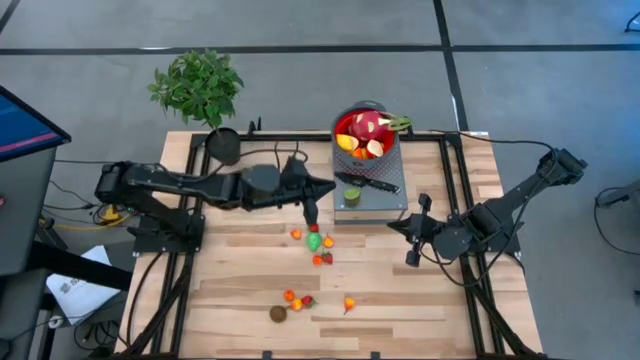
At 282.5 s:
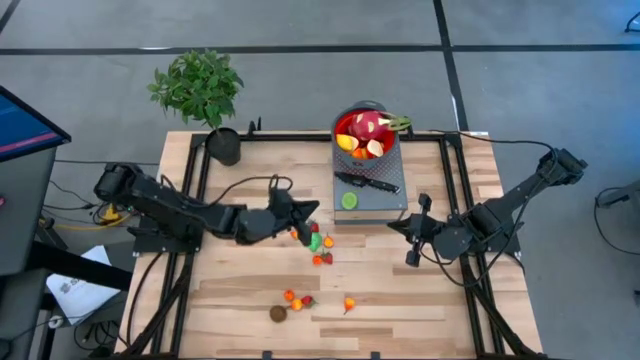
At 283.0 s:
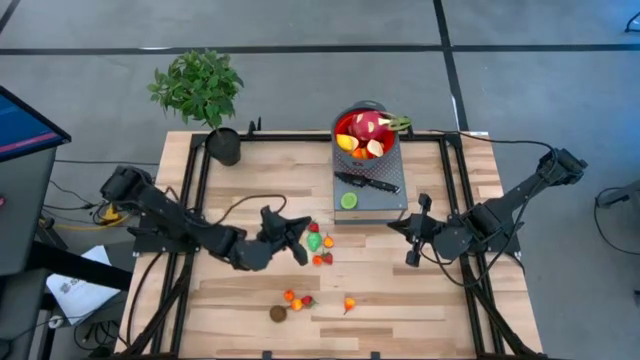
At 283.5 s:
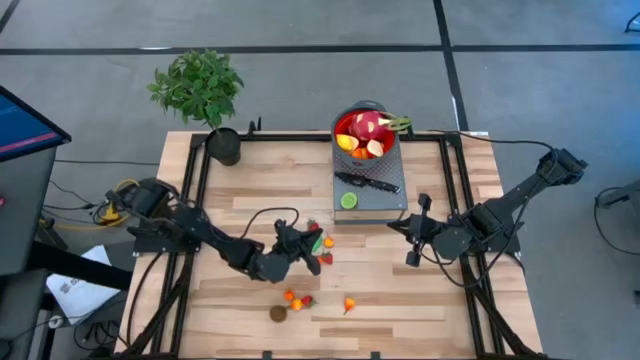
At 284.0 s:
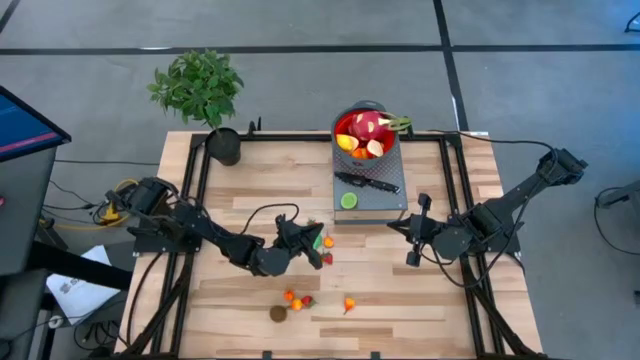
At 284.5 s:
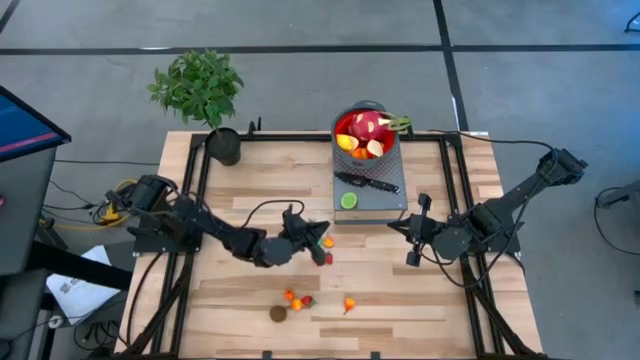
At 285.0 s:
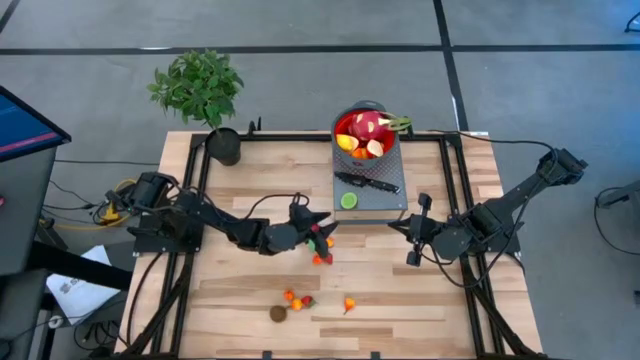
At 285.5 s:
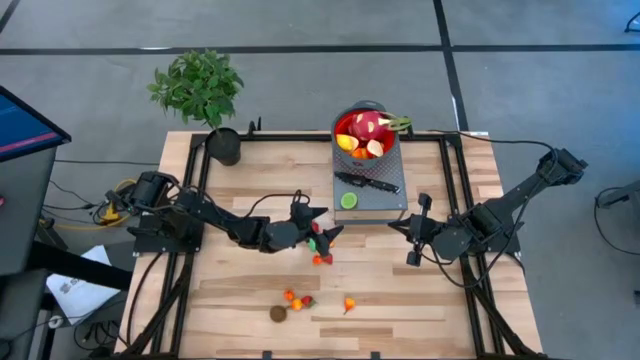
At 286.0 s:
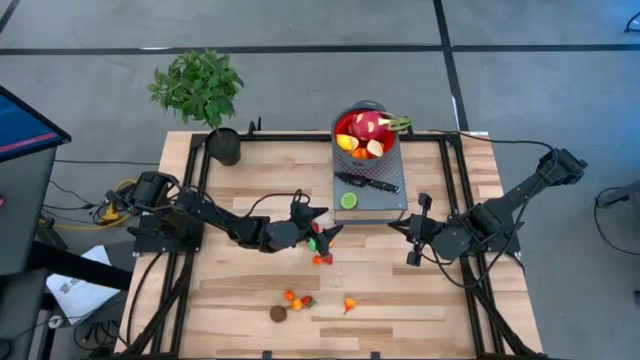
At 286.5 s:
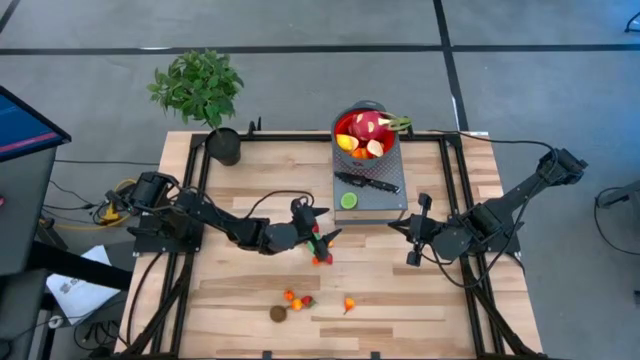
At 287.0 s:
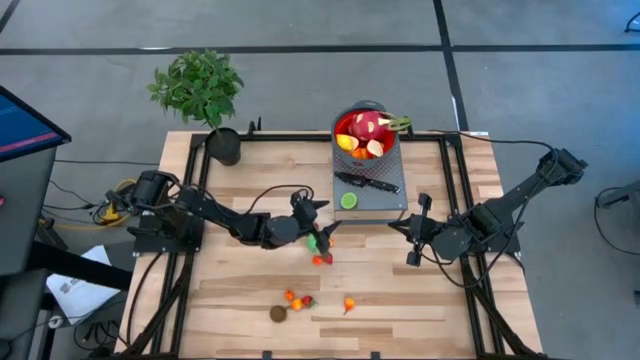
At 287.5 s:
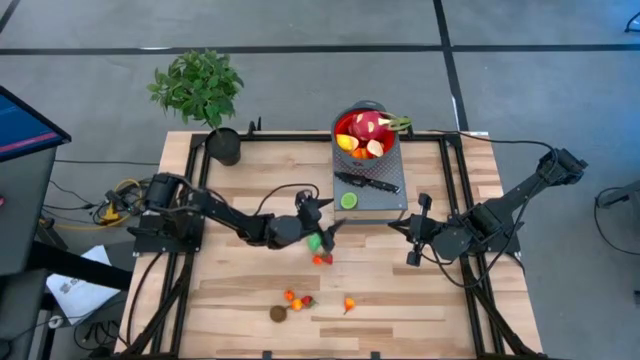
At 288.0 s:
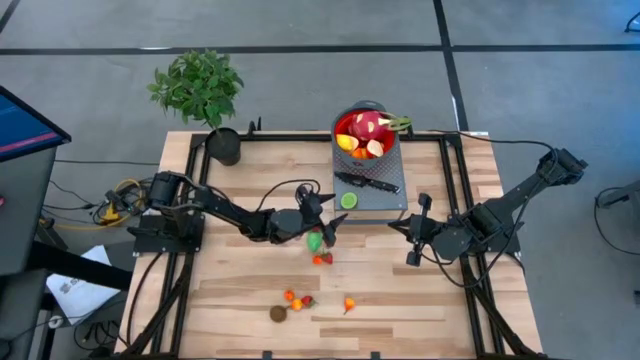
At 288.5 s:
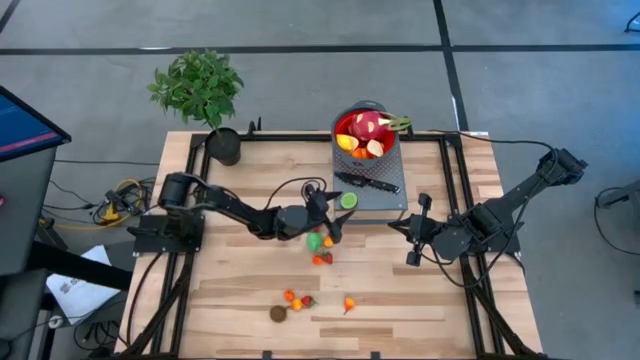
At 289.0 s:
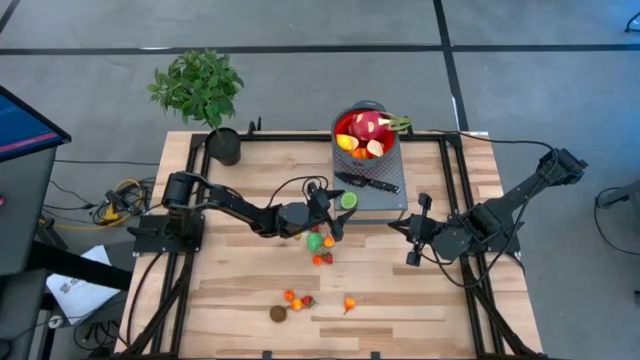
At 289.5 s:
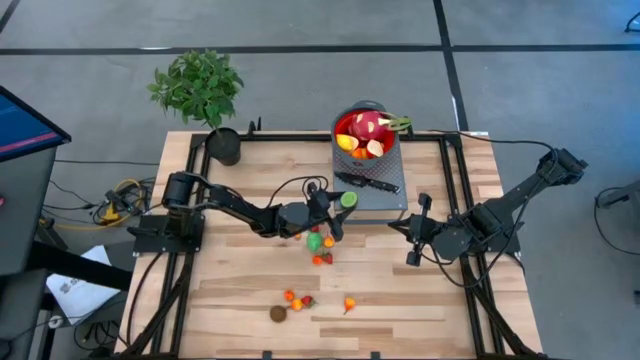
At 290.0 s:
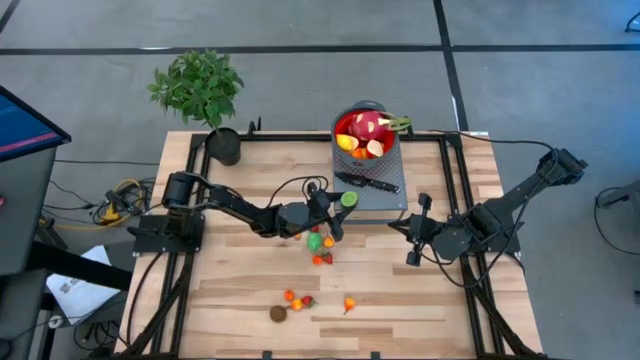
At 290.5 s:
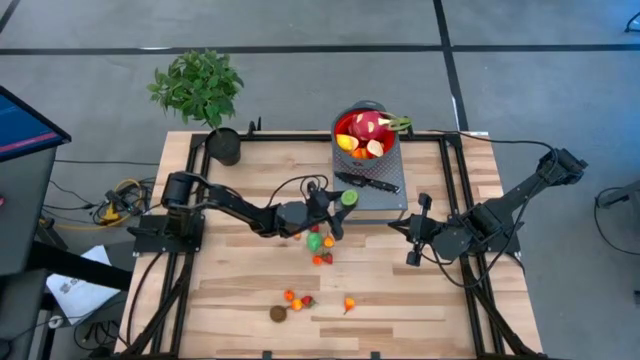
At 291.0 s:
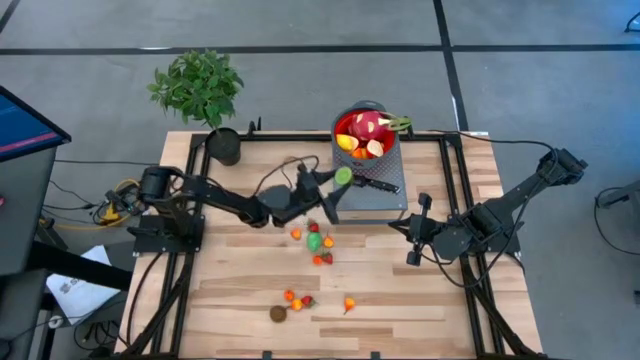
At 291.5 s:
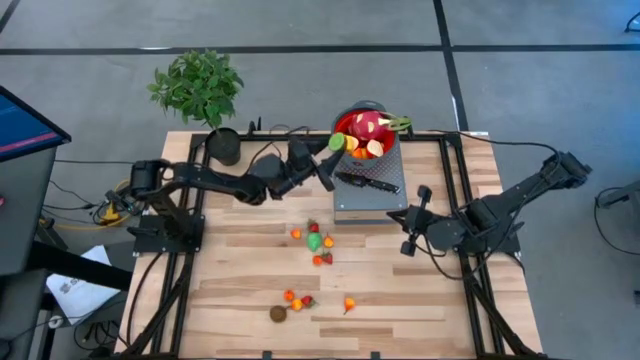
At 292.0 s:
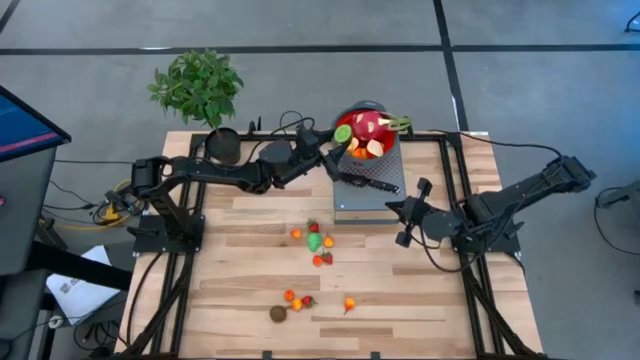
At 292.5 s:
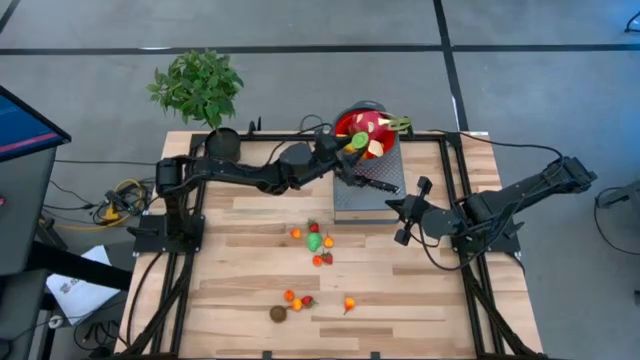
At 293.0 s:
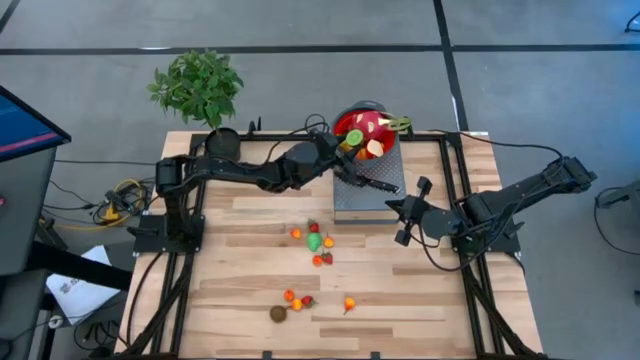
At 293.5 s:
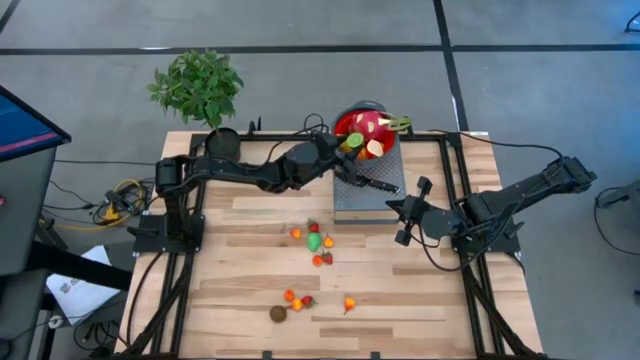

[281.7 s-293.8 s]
Task: Pick & Place Fruit
Put the half kiwi into the red colander on the shelf

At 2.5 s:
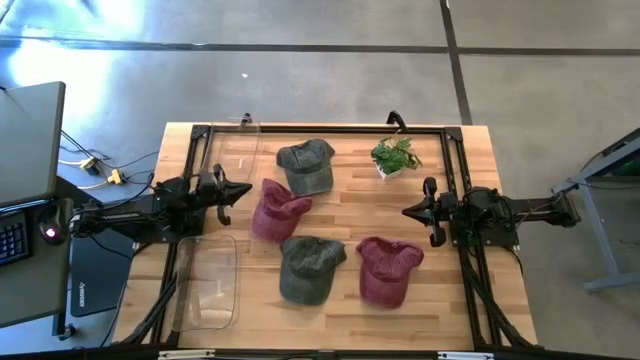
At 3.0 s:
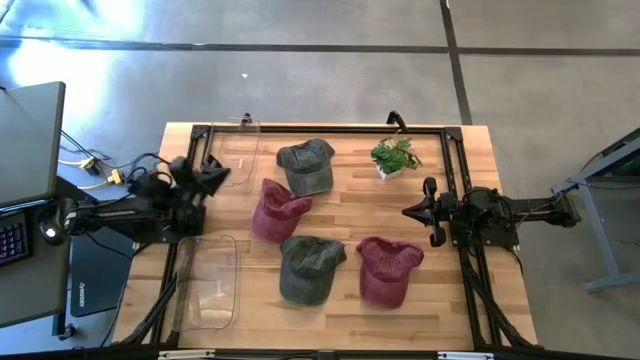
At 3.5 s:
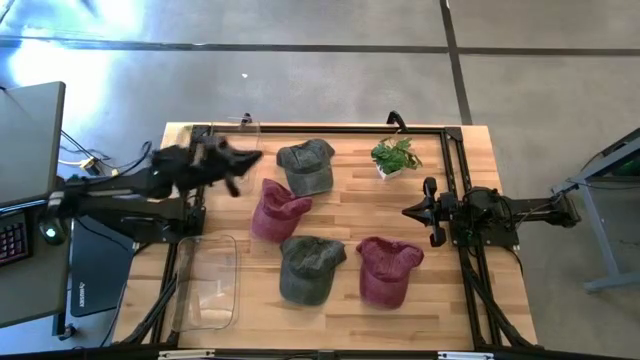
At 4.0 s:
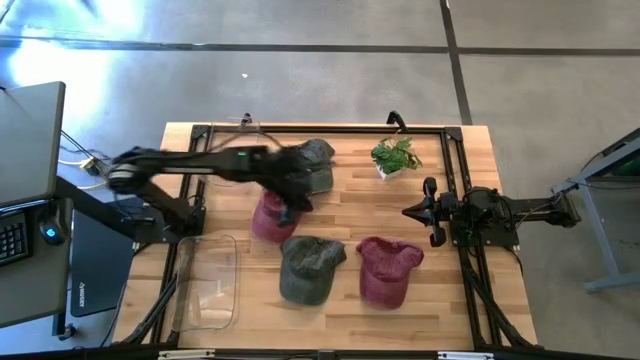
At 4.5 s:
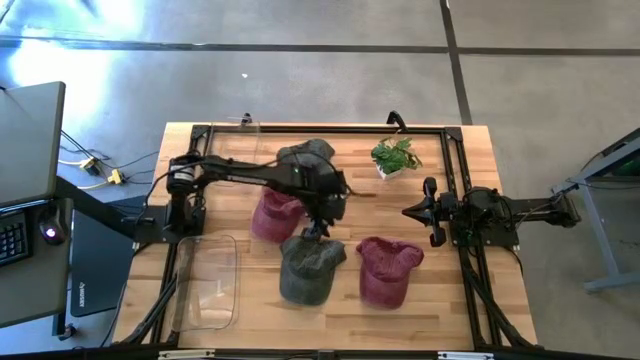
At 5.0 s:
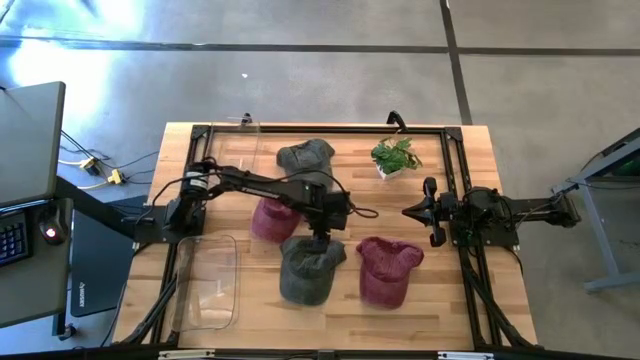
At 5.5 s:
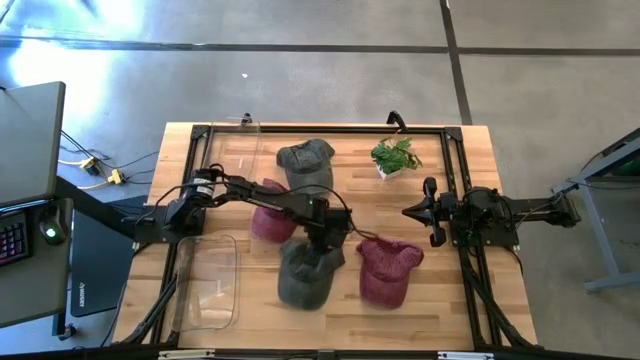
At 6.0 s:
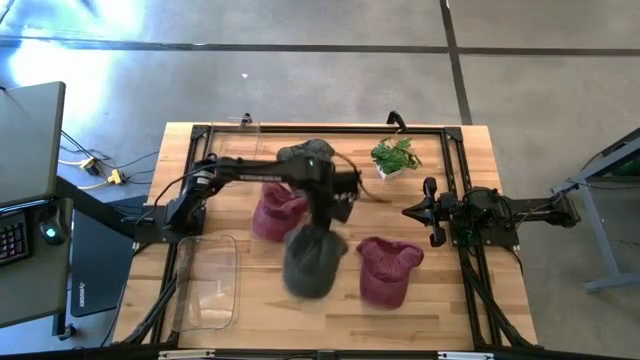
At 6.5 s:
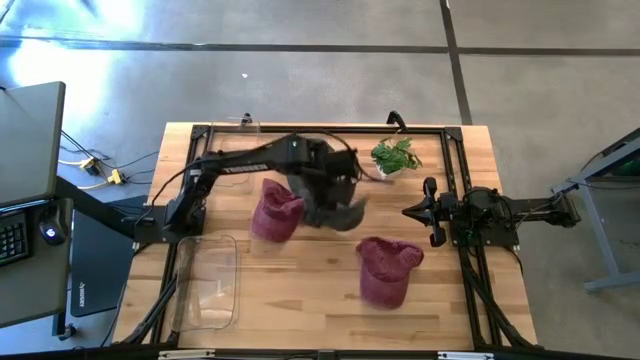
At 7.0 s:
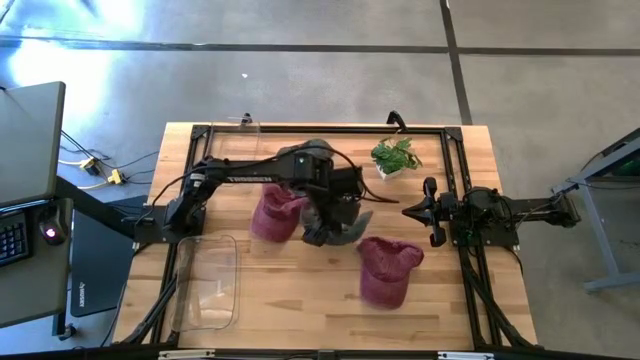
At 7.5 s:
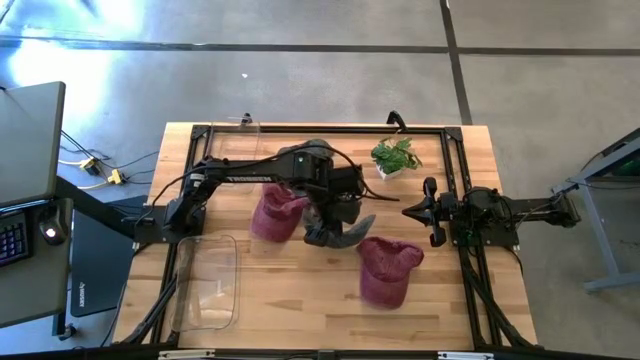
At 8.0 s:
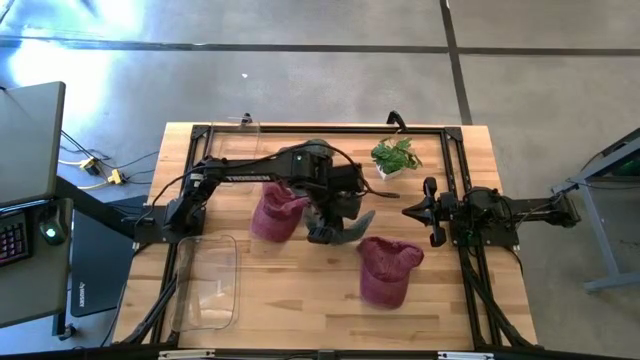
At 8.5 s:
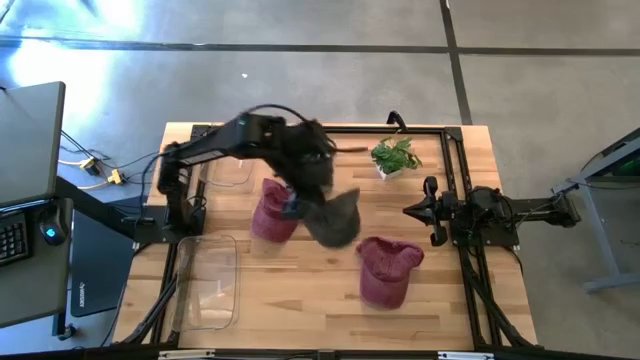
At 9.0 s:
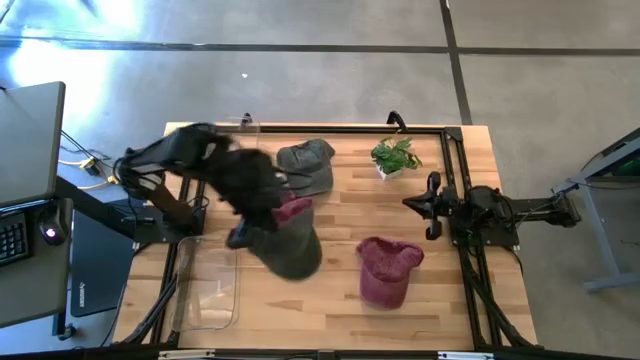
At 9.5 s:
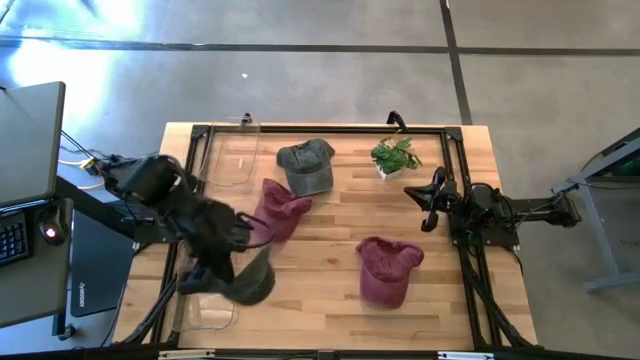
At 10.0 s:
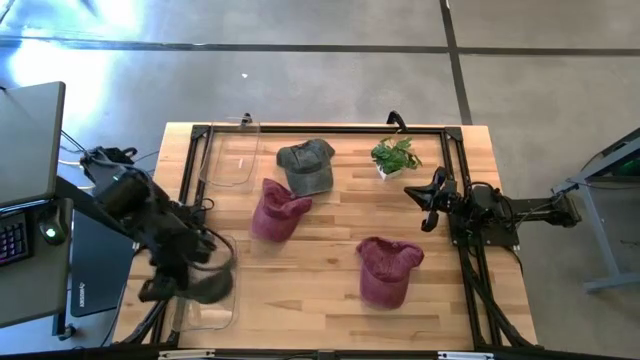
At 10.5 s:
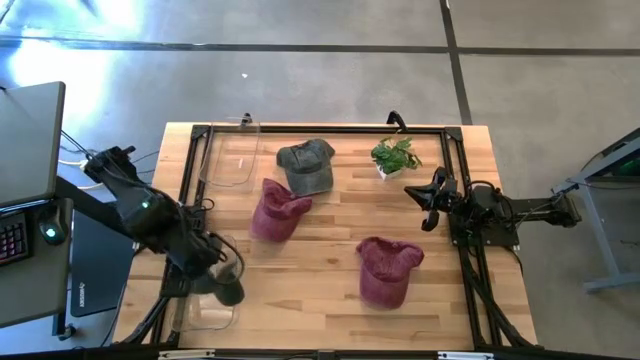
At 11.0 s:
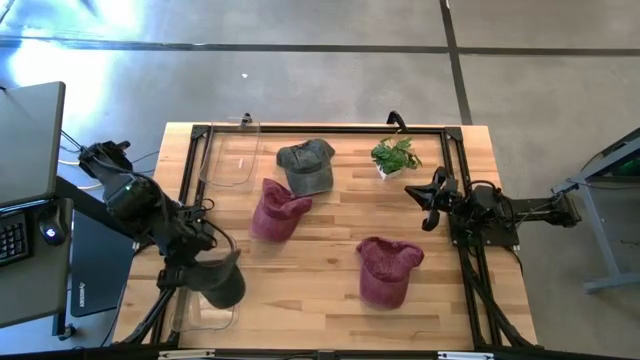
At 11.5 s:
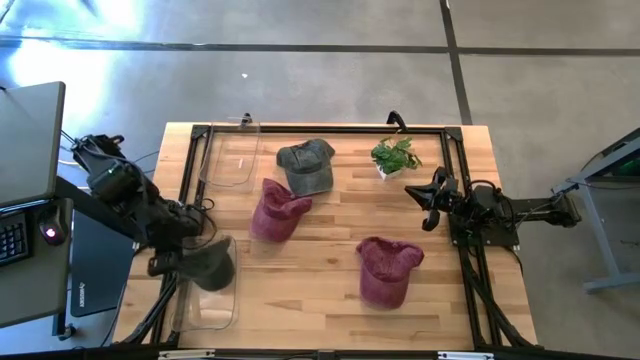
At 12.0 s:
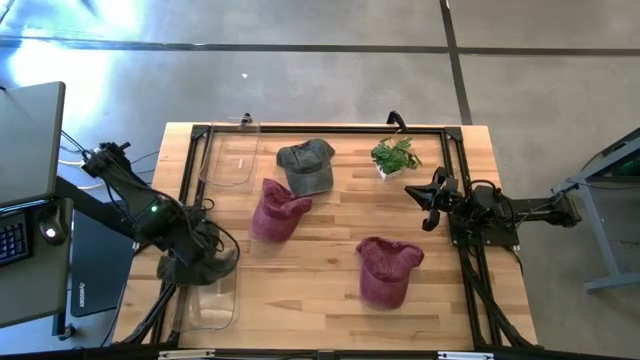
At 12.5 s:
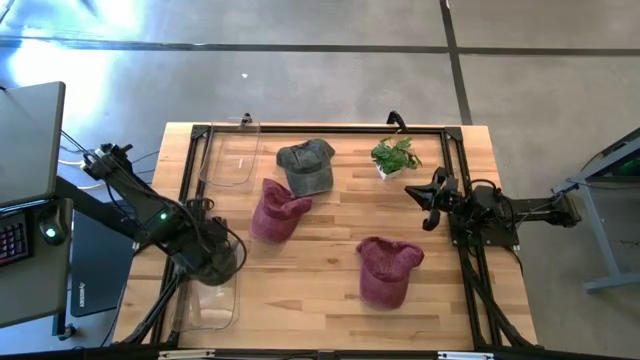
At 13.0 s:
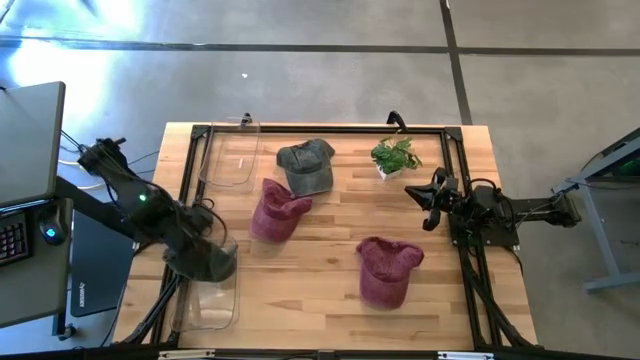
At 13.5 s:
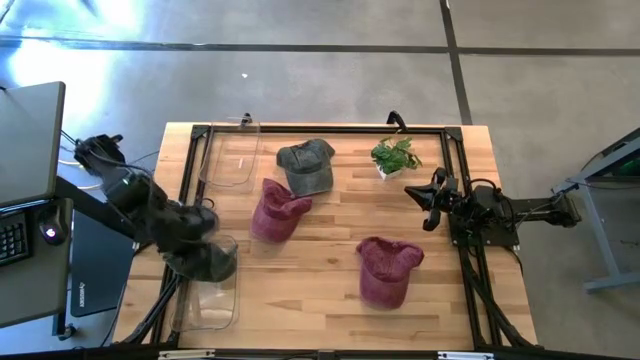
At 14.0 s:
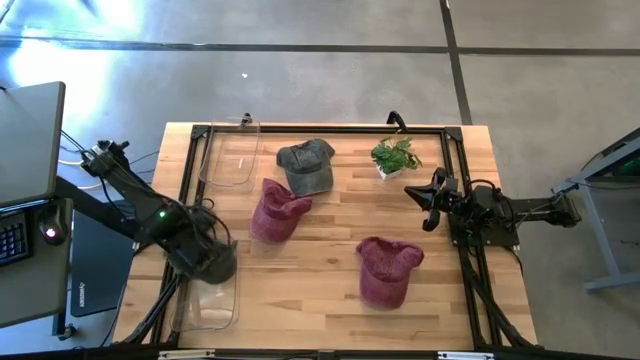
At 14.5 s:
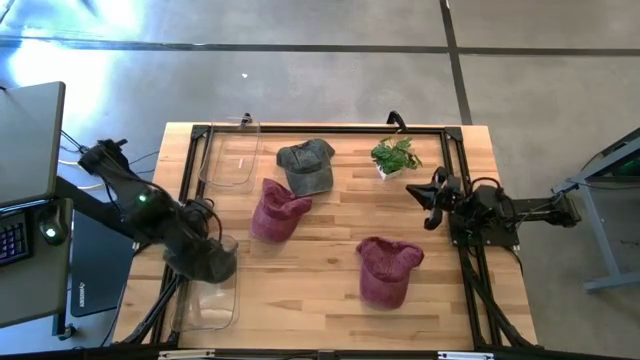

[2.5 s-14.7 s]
Task: Pick & Place hat
Put the bottom black cap into the bottom transparent bin
